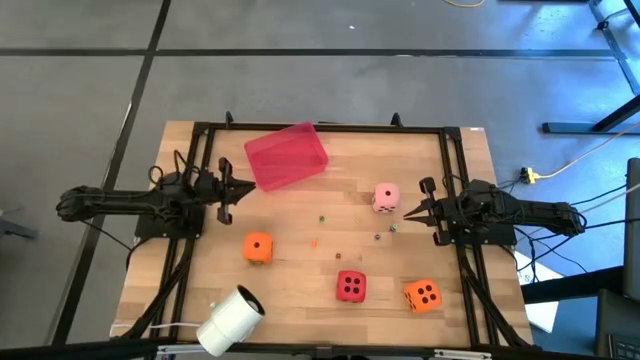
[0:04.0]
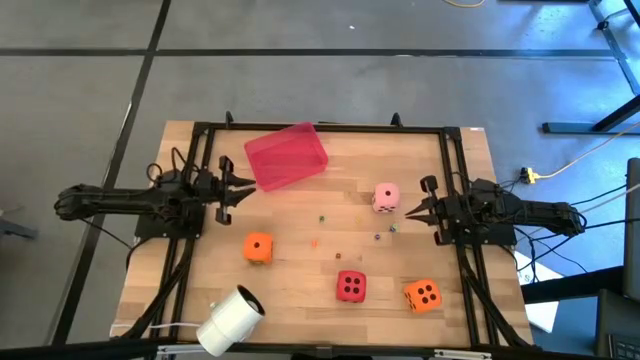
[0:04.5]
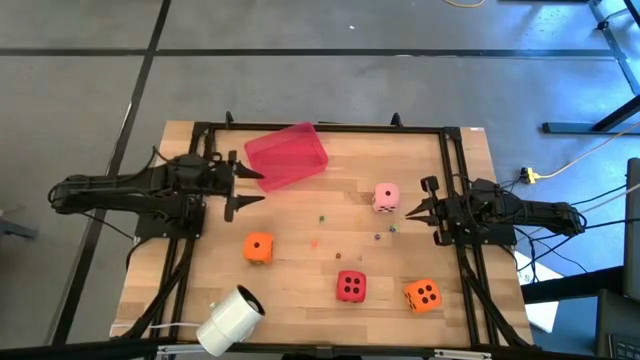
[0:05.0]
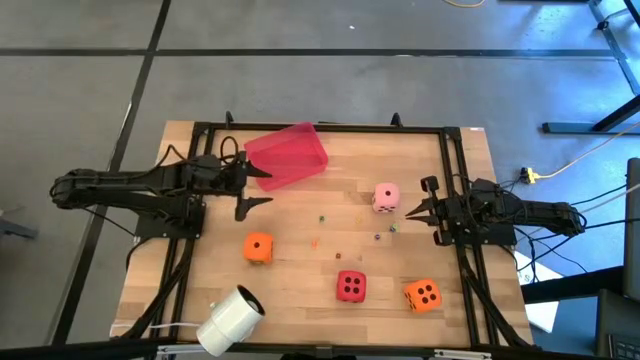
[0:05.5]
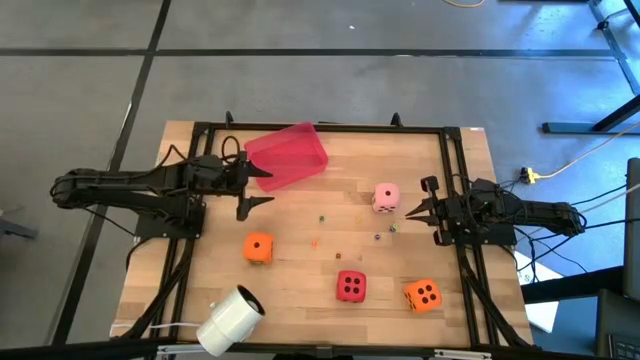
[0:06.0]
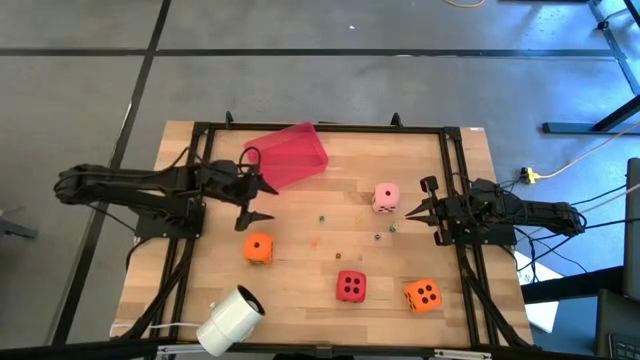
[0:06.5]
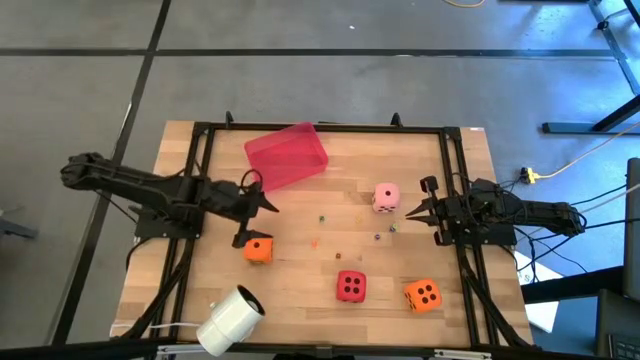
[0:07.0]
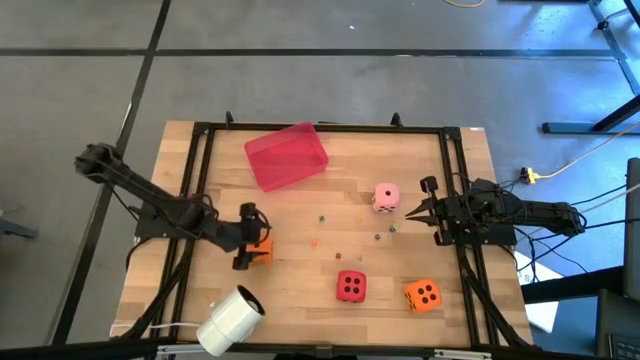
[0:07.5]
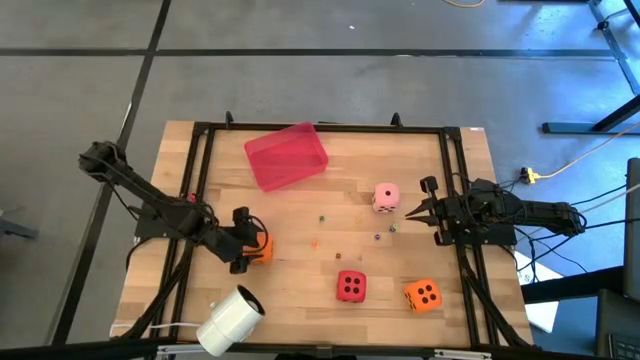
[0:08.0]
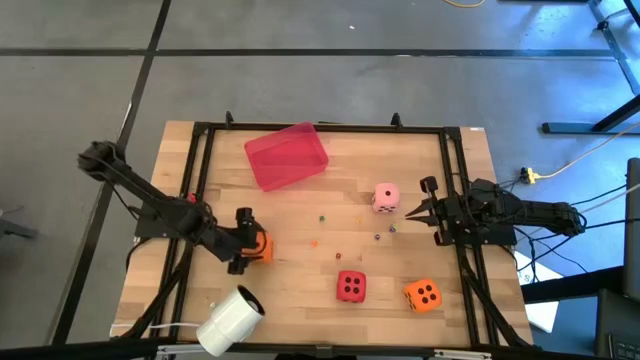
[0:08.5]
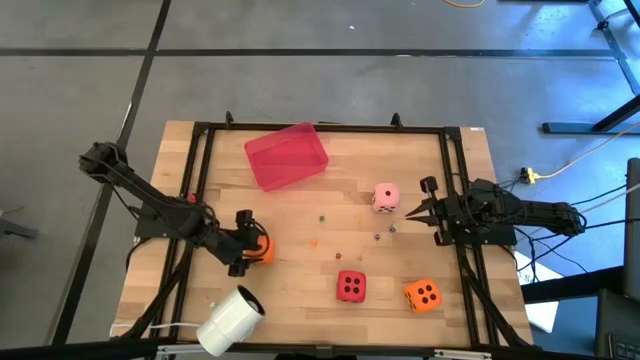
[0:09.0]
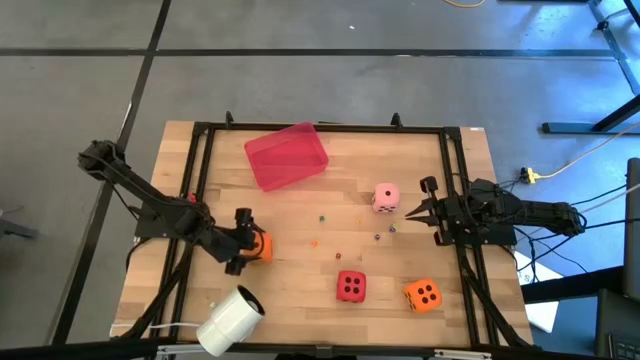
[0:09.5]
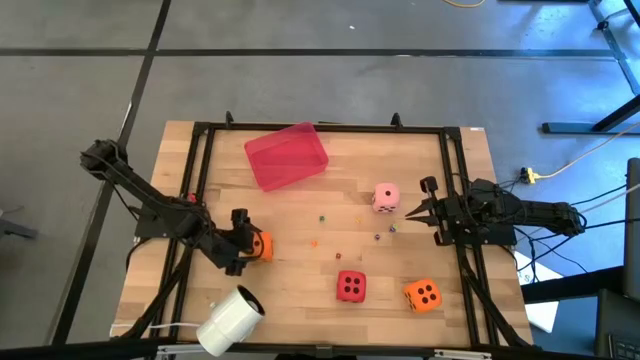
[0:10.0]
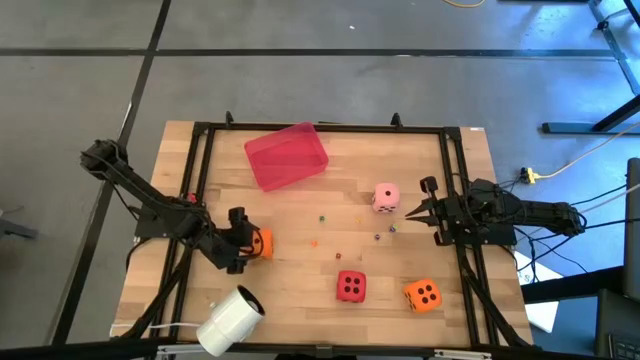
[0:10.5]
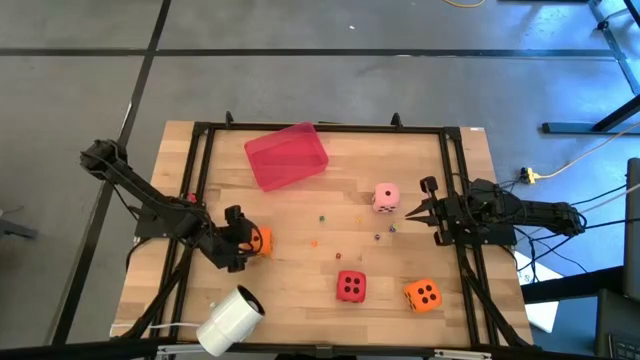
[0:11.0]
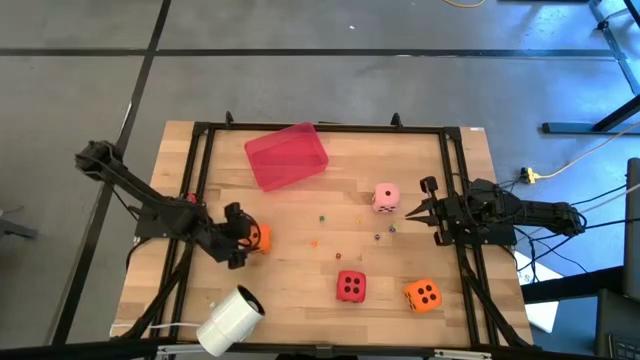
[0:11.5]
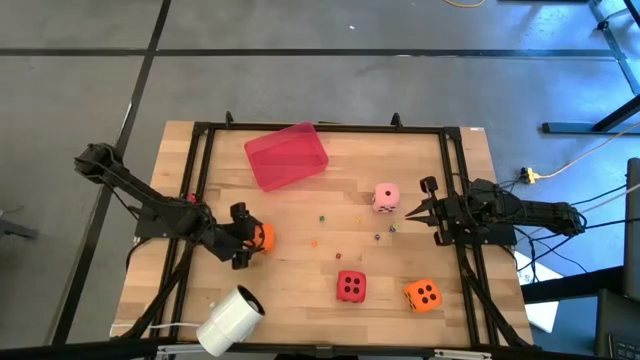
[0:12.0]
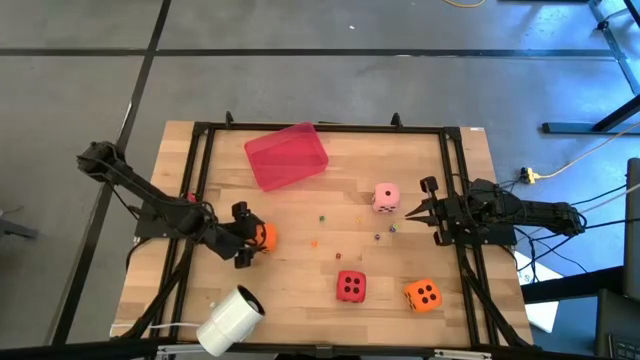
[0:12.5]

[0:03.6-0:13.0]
Task: Pick & Place Dice
Put the left large orange die into the red bin

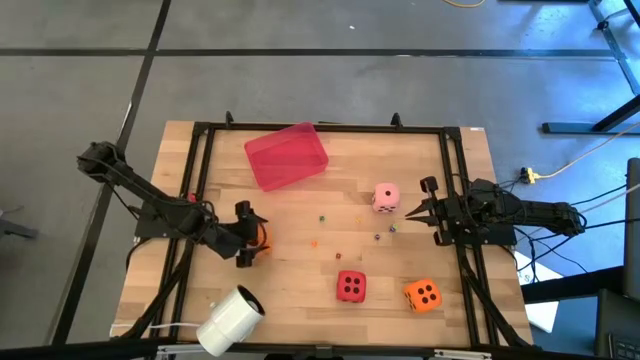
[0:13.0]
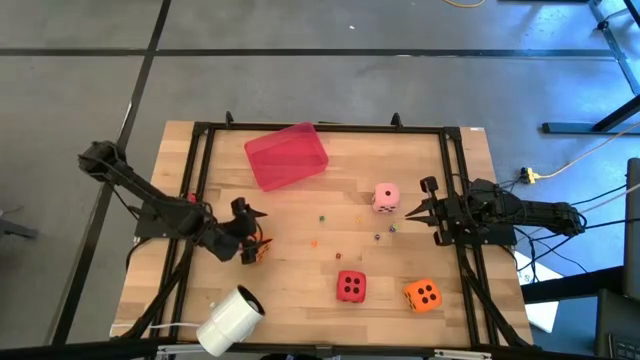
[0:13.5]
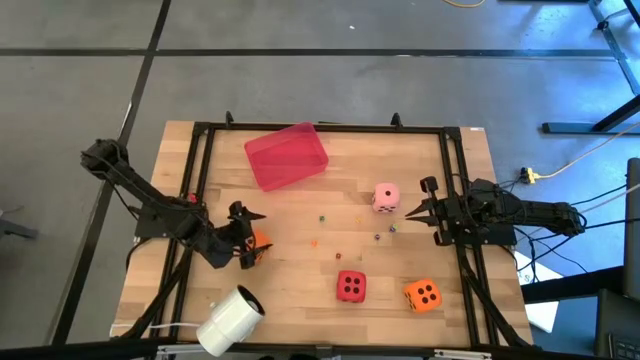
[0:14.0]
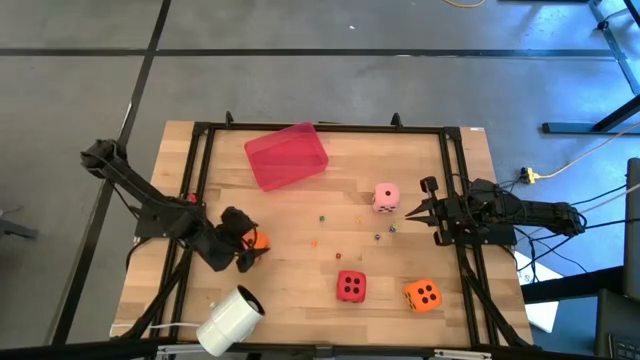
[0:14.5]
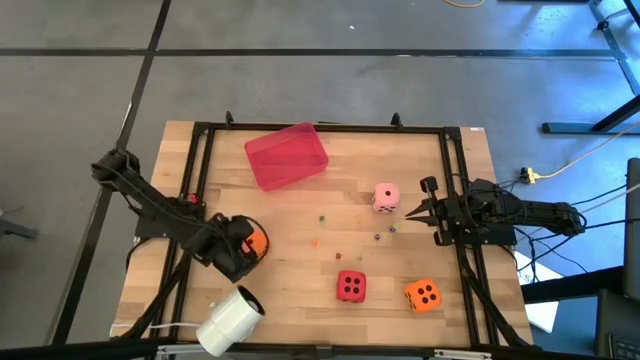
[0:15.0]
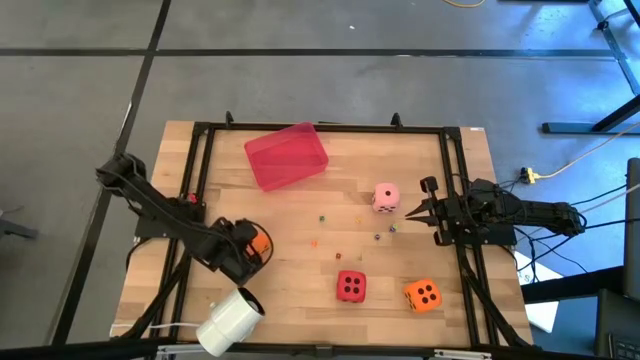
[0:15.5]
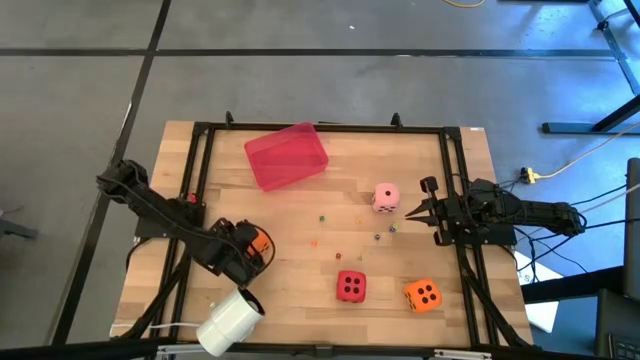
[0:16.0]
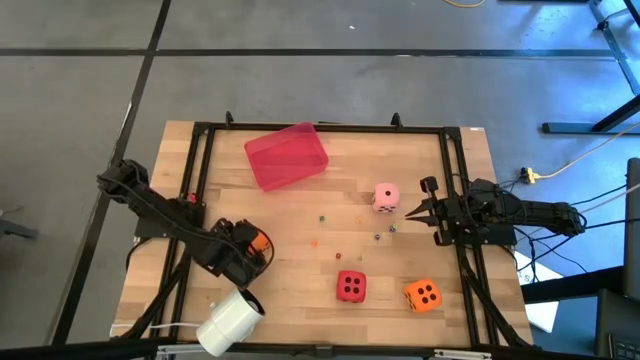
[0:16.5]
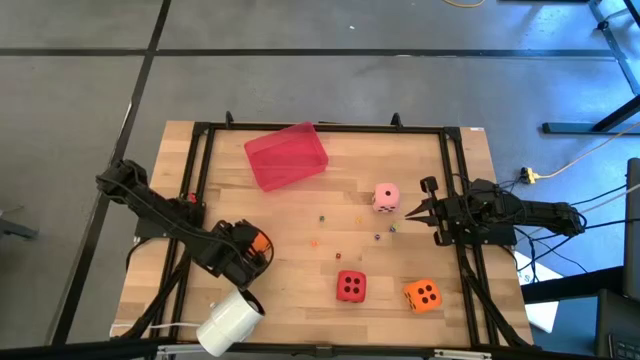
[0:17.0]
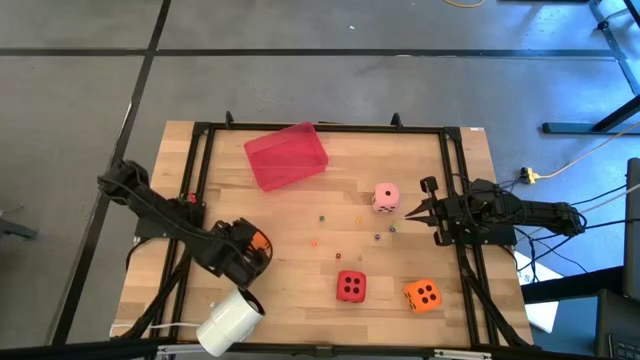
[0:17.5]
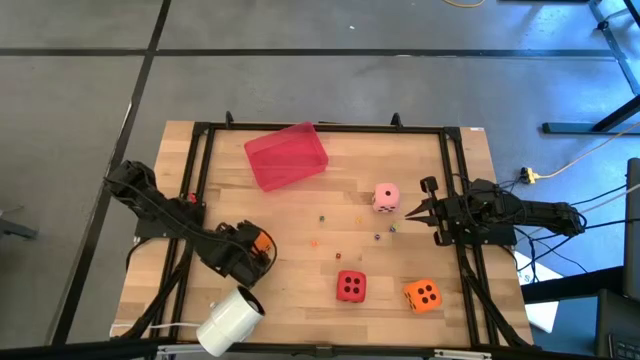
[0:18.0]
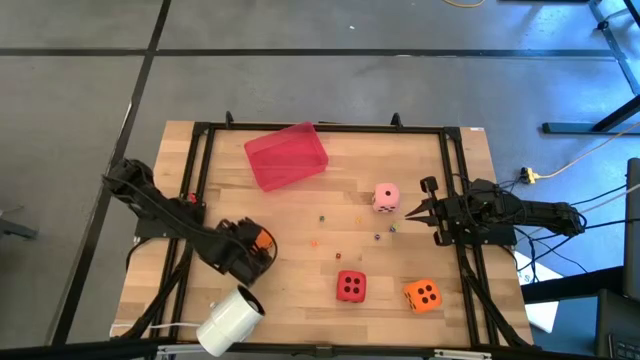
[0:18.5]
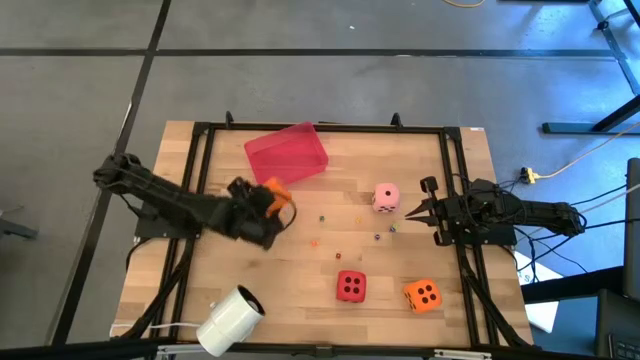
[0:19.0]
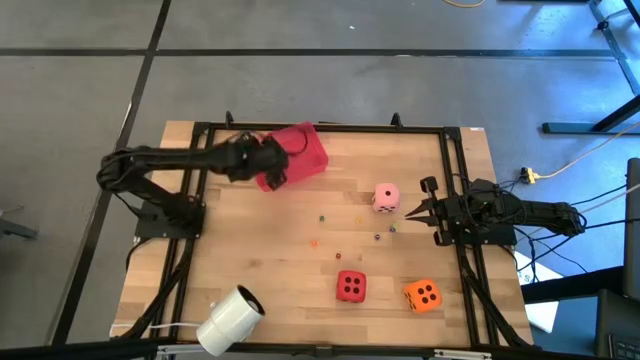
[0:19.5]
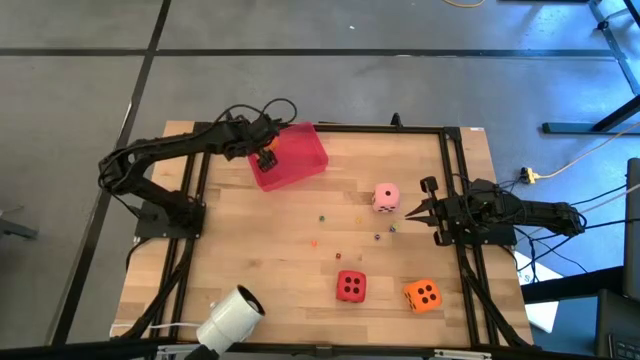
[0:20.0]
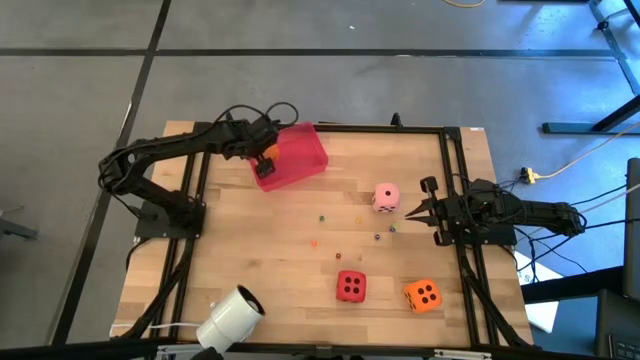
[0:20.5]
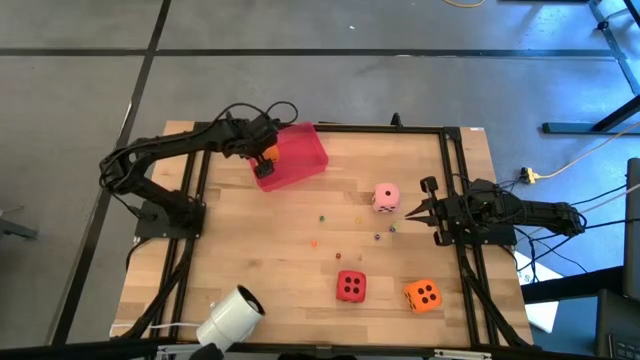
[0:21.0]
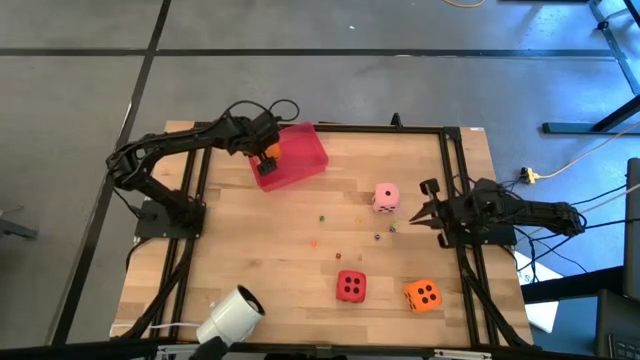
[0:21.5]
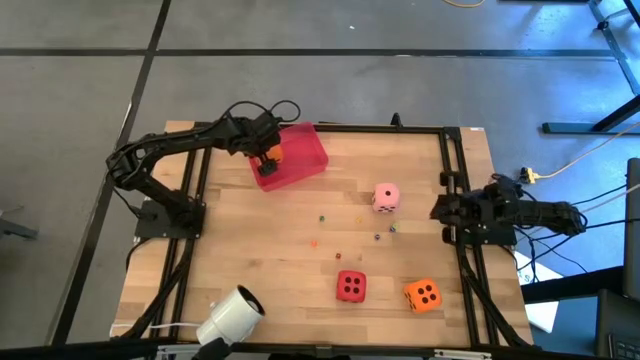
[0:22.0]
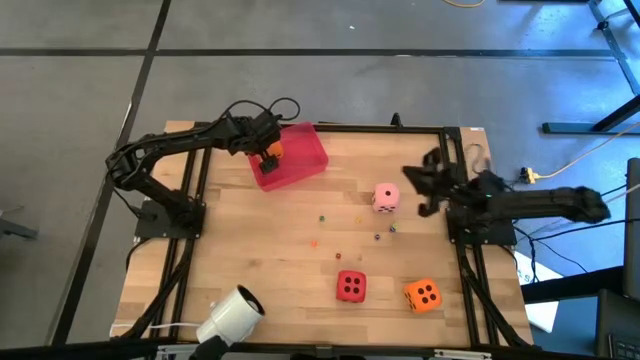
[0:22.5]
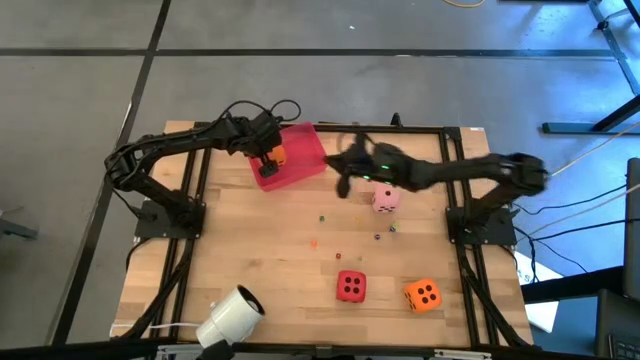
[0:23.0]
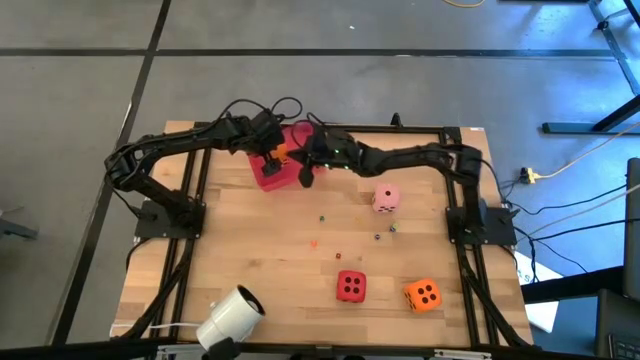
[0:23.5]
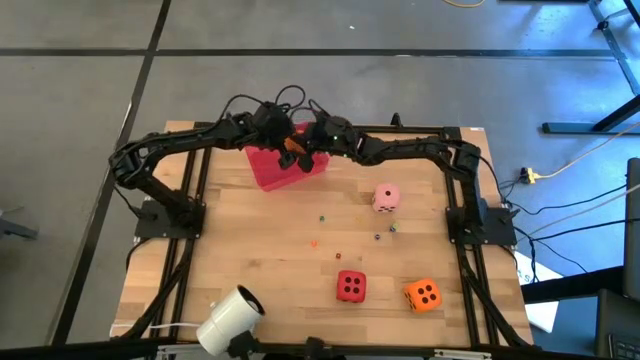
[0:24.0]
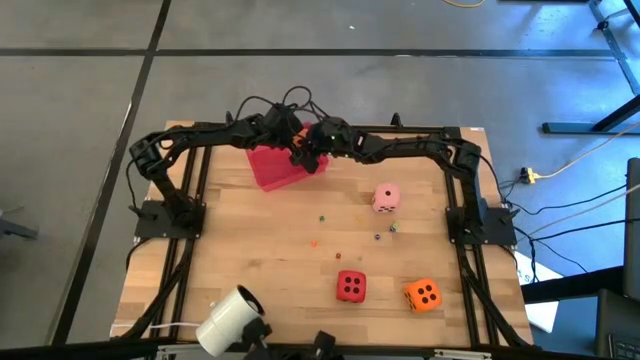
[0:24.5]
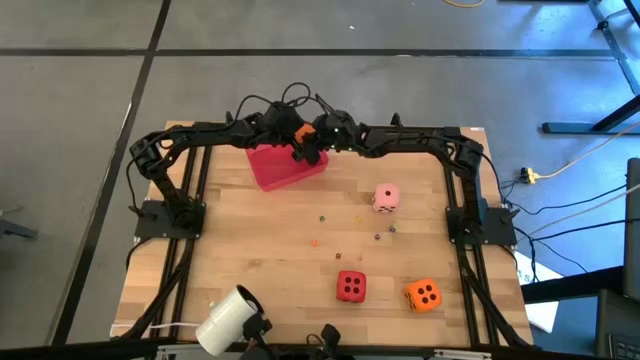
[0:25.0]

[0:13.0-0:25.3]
Put the left large orange die into the red bin
